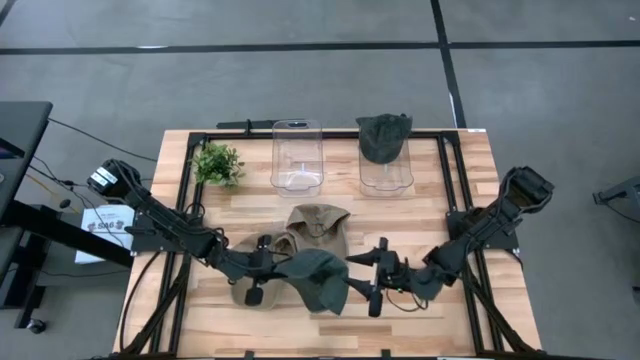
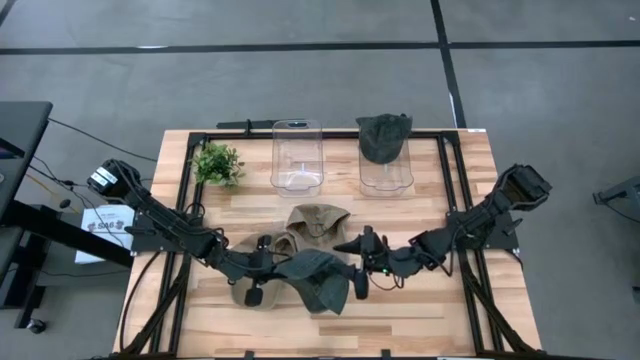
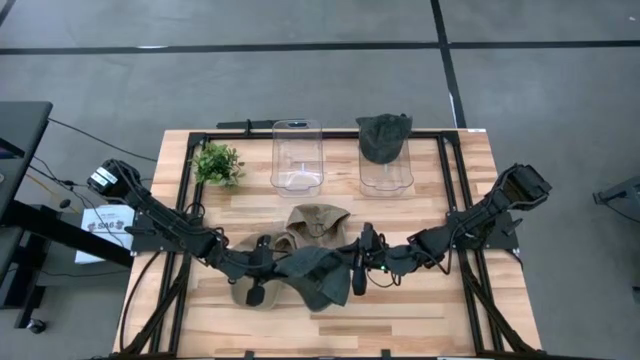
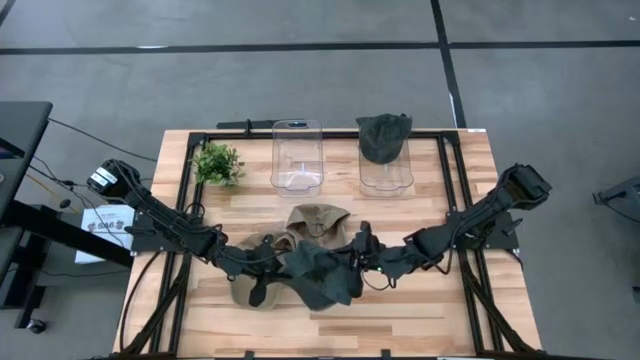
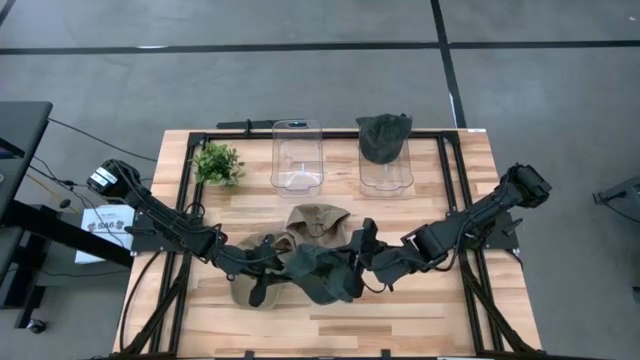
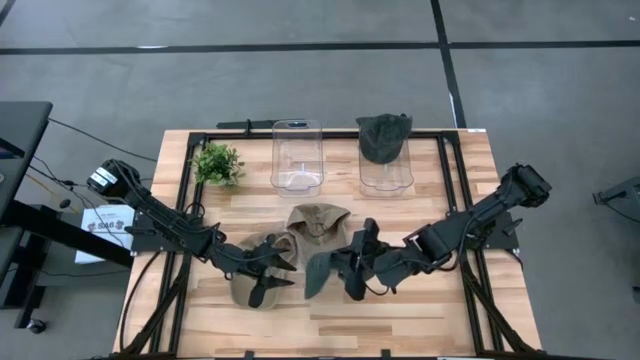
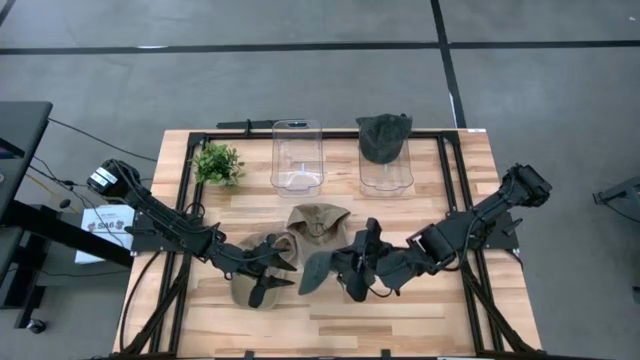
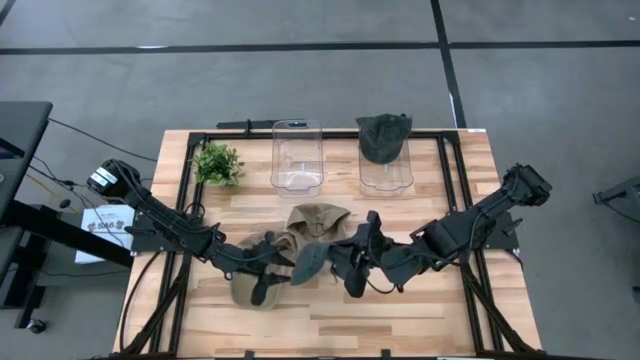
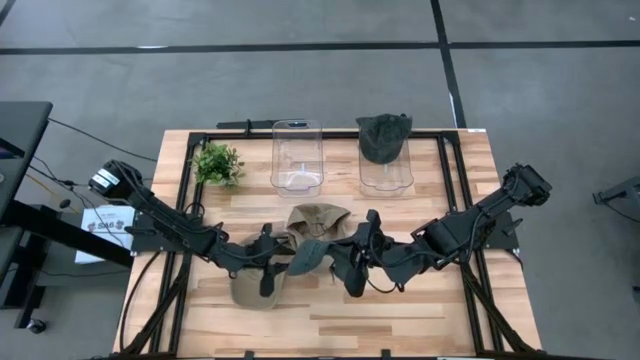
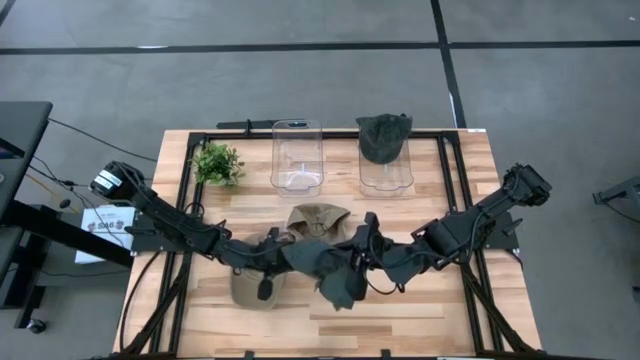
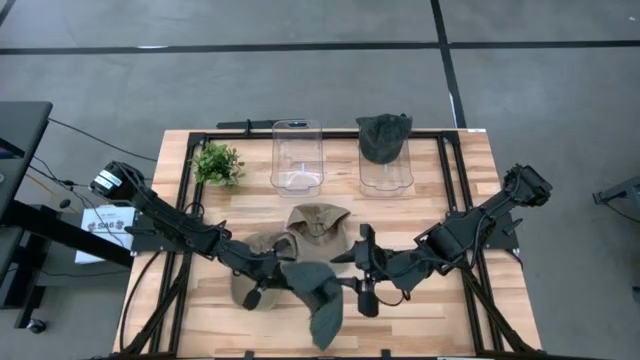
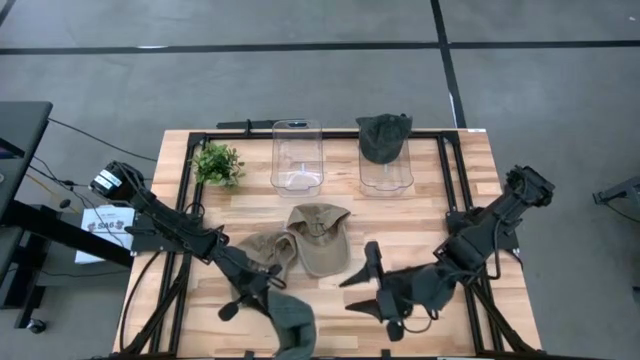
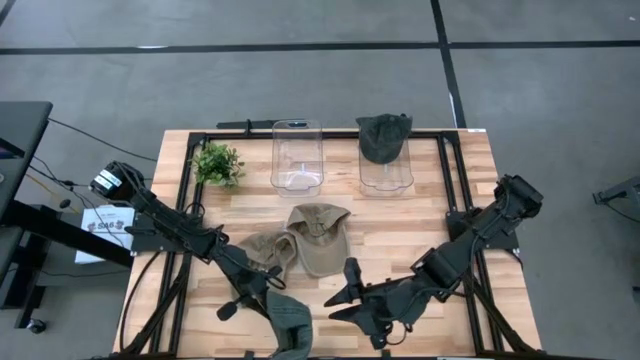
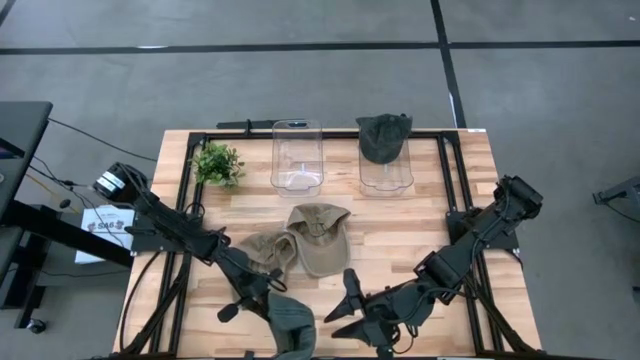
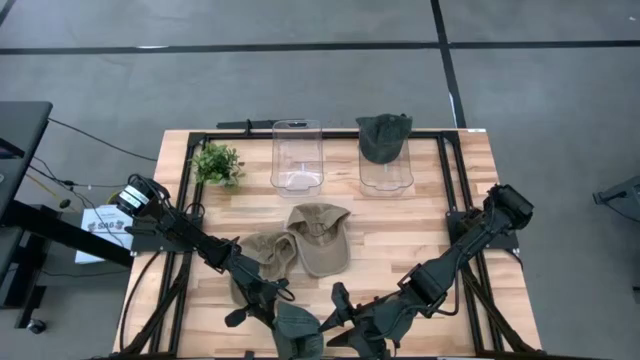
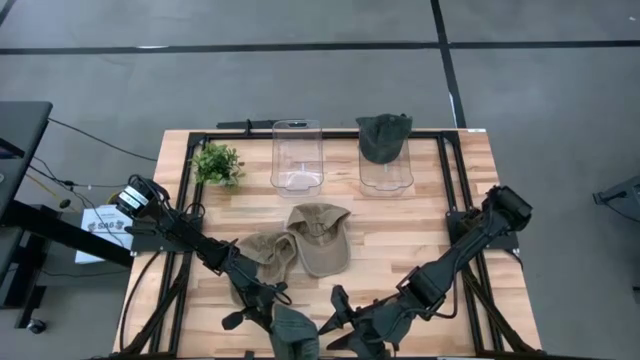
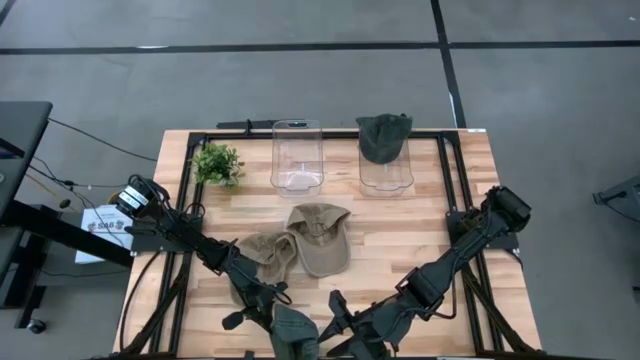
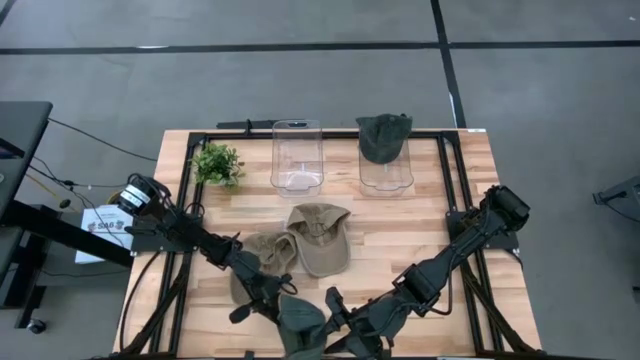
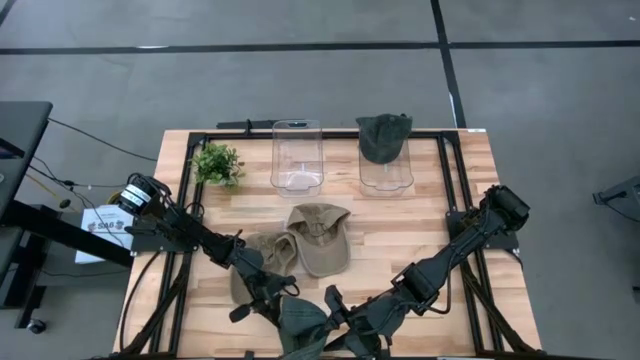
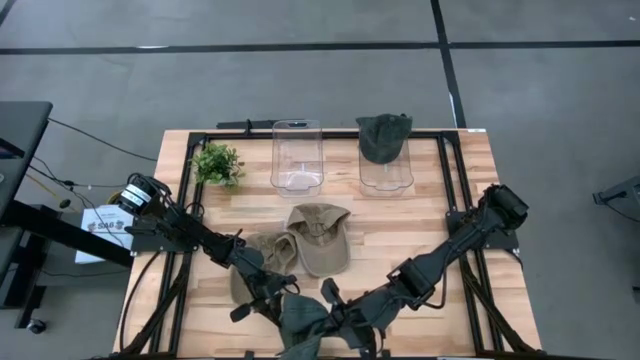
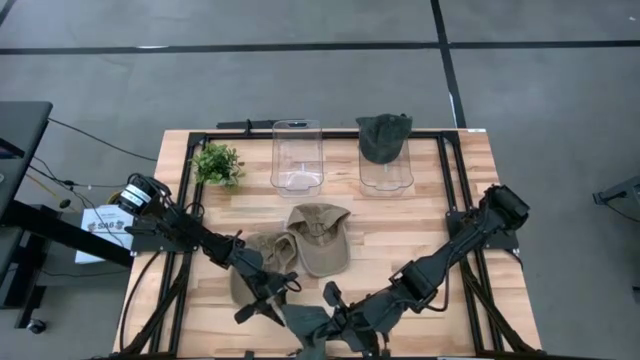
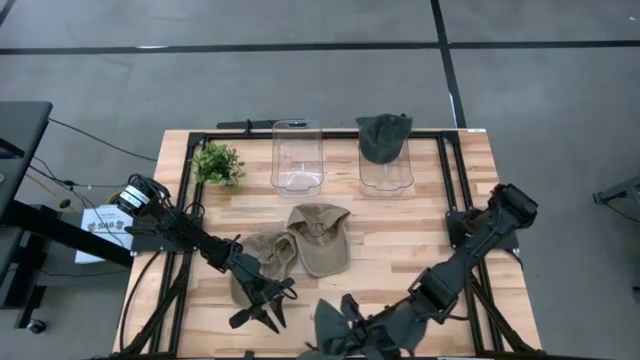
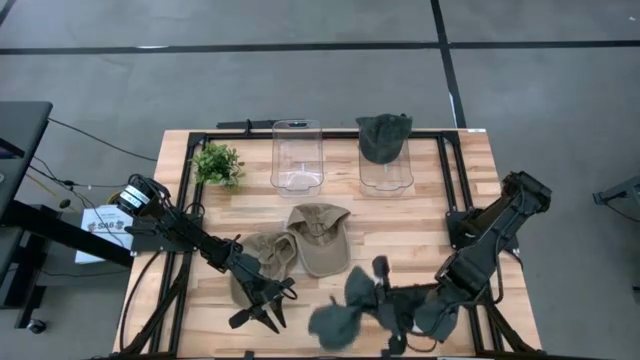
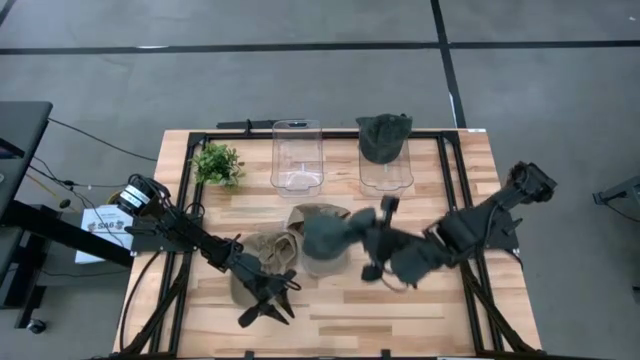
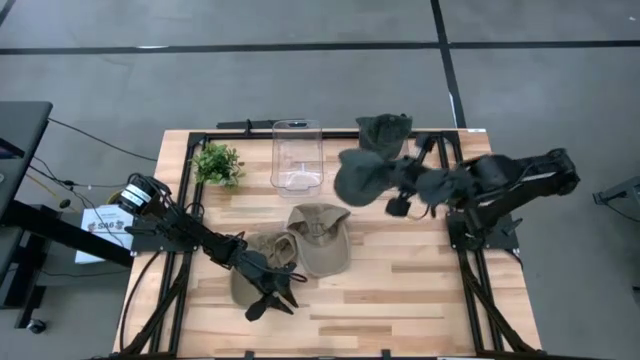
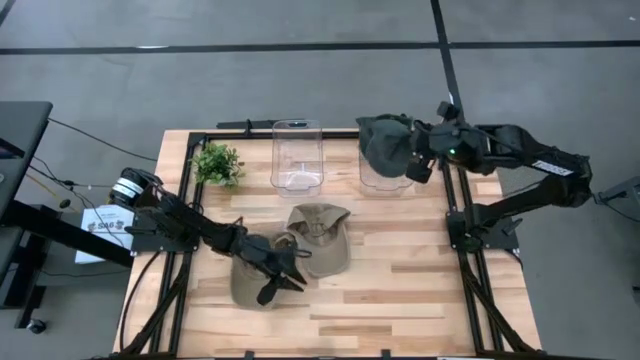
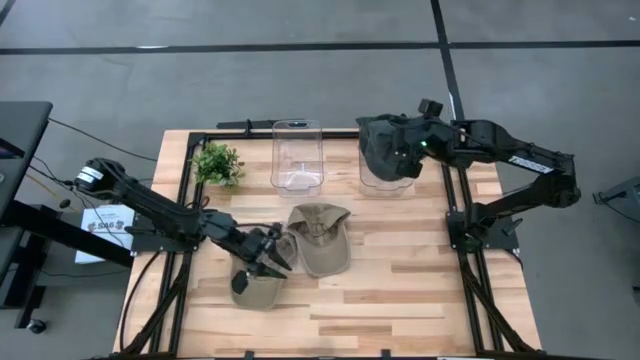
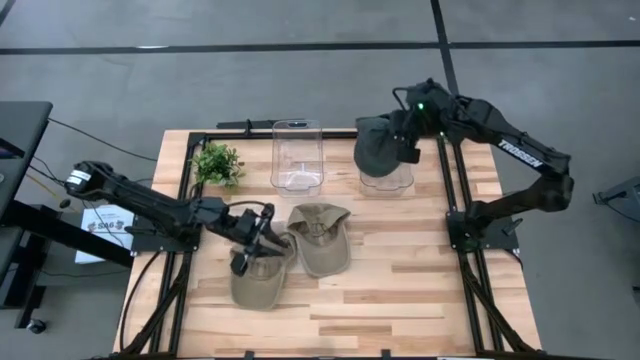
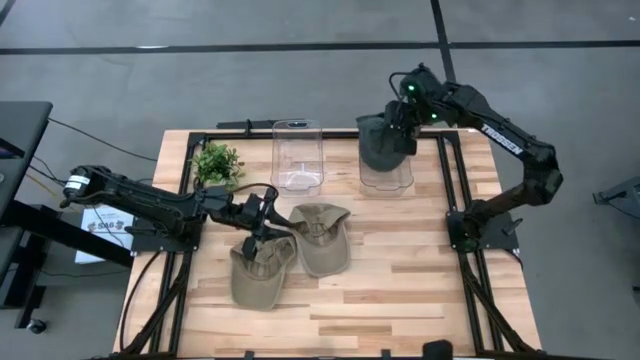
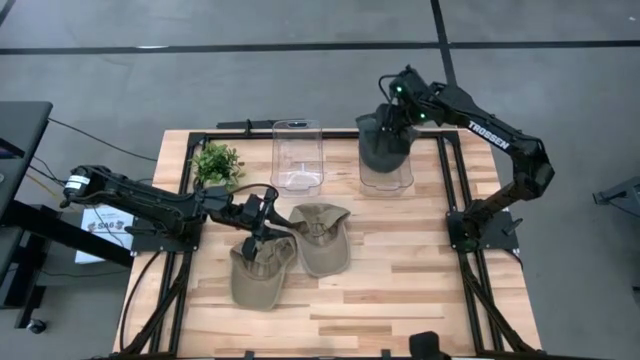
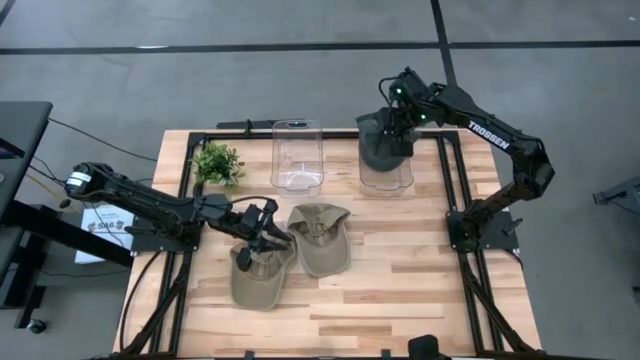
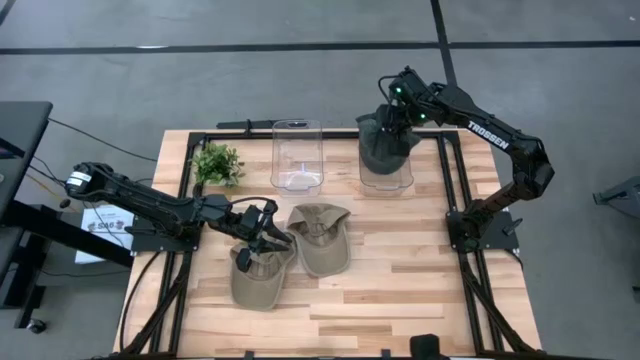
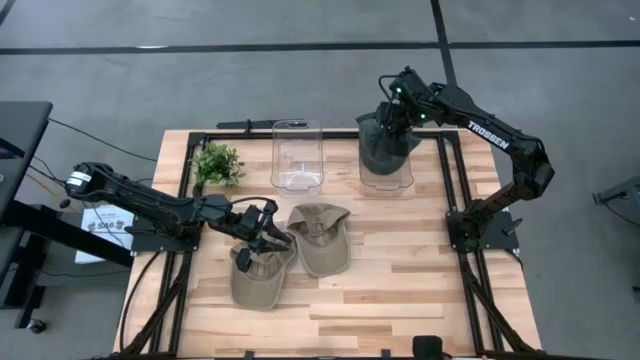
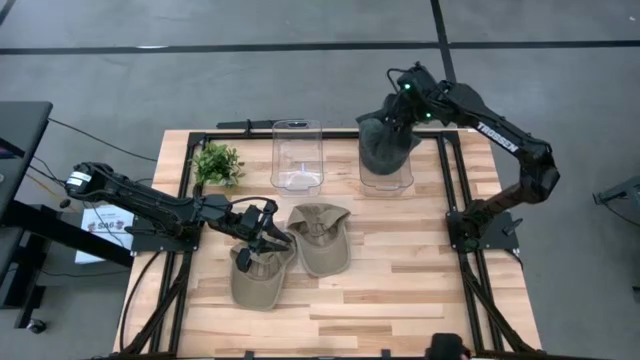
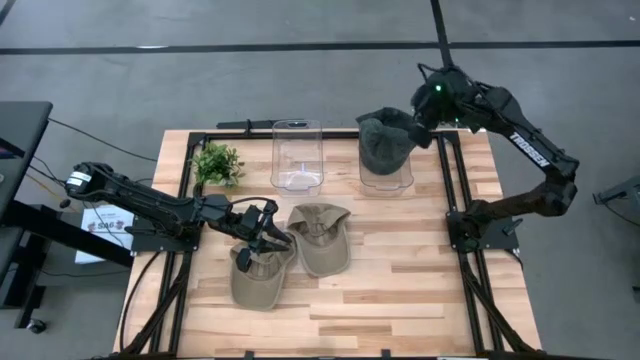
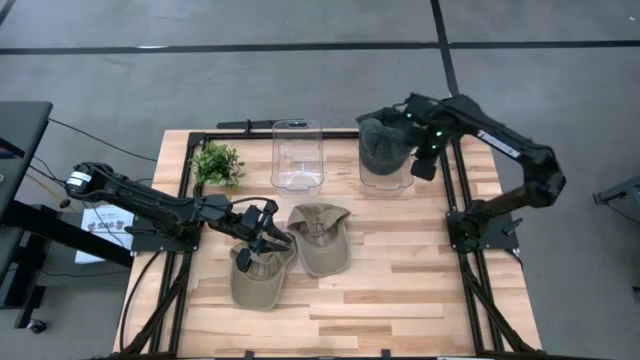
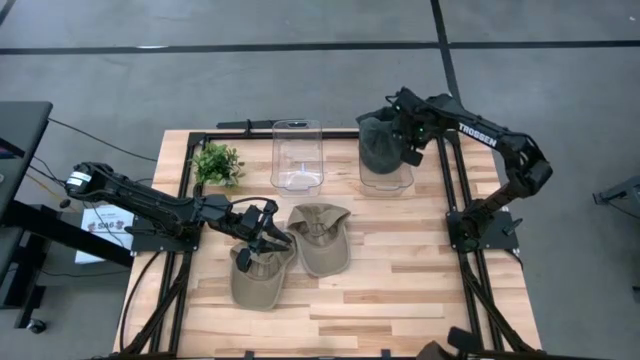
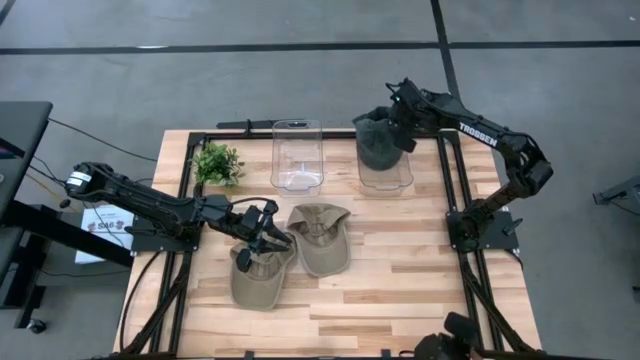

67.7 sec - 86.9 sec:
Task: Pick & Place hat
Put the black cap into the right transparent bin

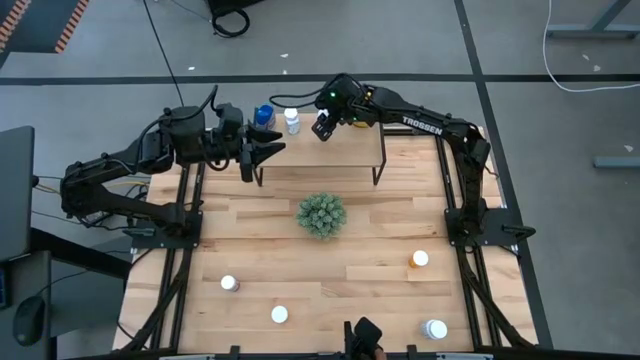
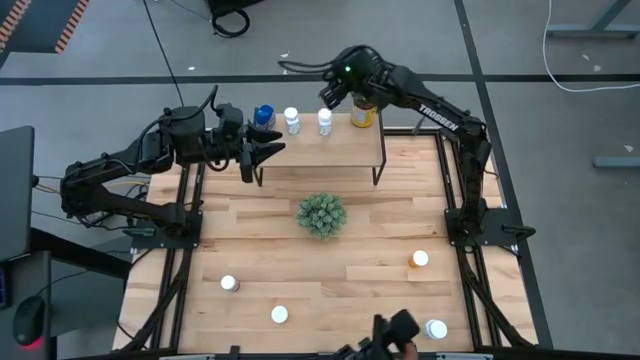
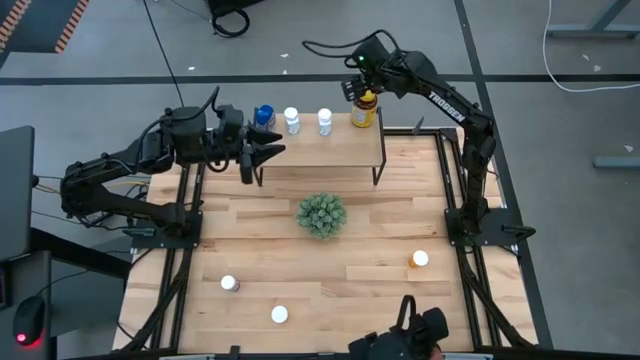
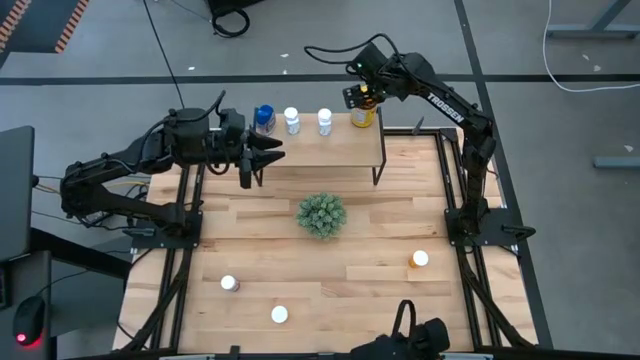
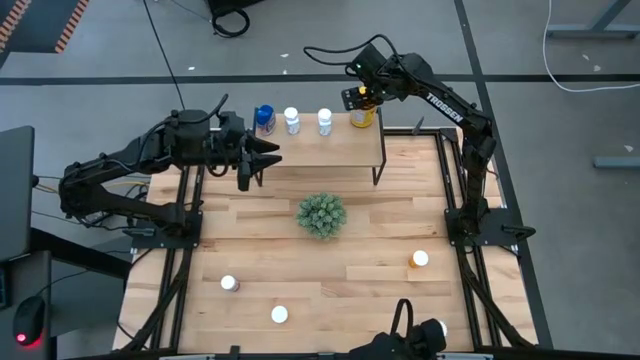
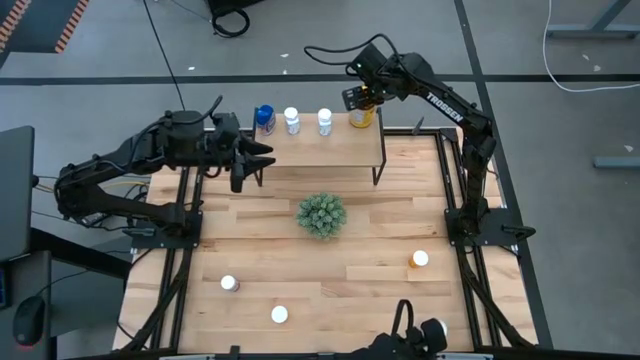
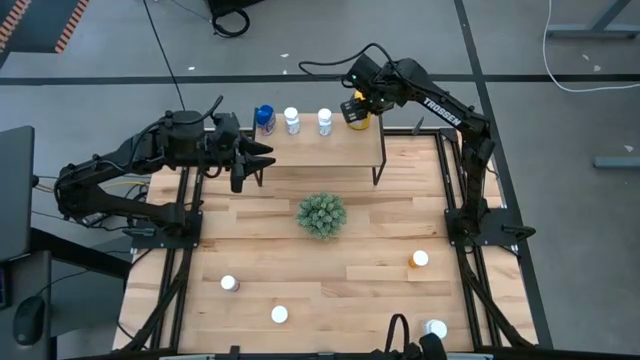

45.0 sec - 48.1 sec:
Task: Pick and place medicine bottles onto shelf by color
Adjust the yellow medicine on the shelf

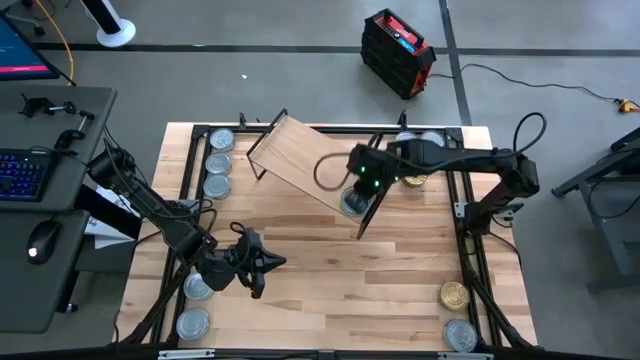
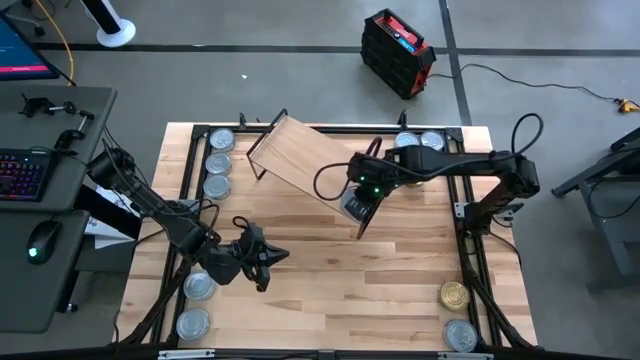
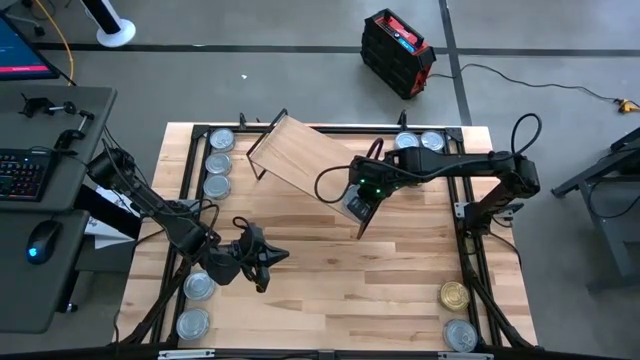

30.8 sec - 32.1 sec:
Task: Stack canned seafood by type on shelf
Adjust the green-white tuna can on the shelf
